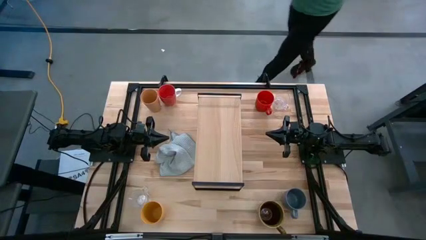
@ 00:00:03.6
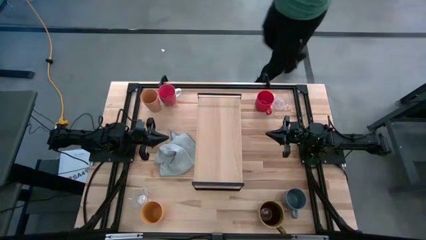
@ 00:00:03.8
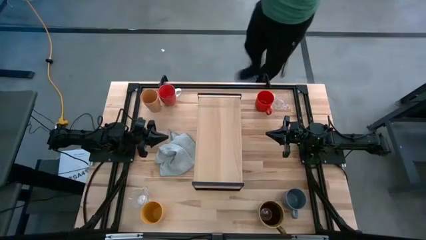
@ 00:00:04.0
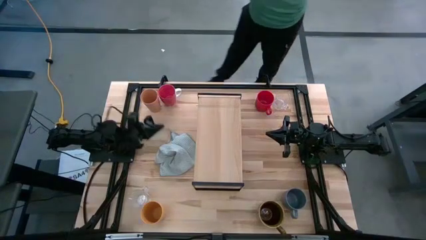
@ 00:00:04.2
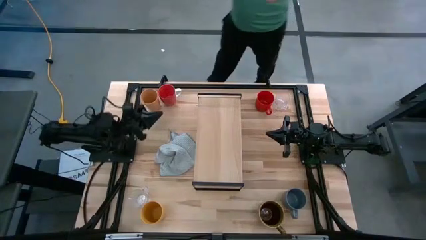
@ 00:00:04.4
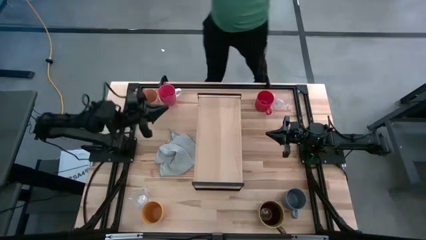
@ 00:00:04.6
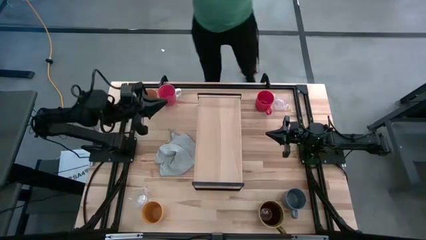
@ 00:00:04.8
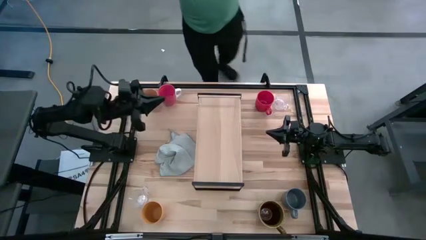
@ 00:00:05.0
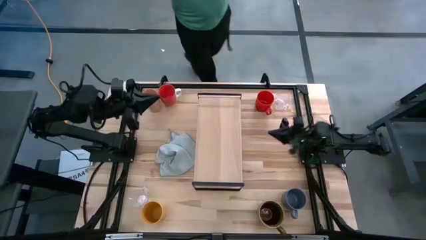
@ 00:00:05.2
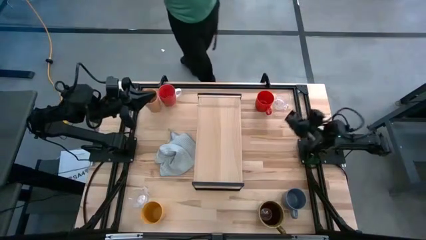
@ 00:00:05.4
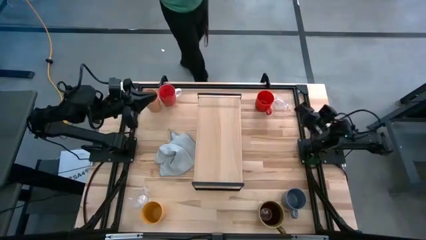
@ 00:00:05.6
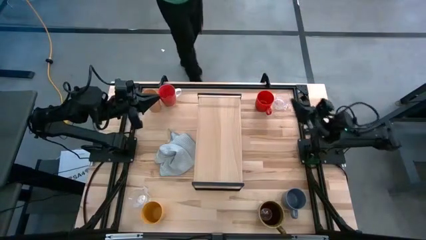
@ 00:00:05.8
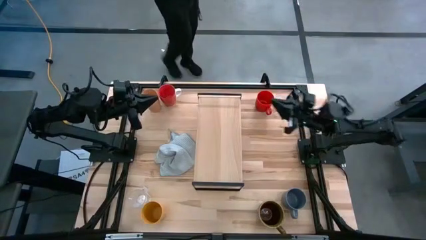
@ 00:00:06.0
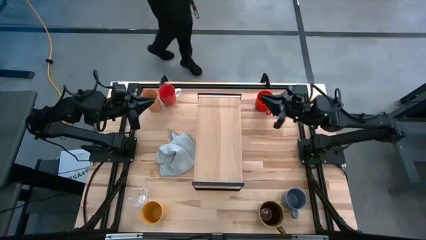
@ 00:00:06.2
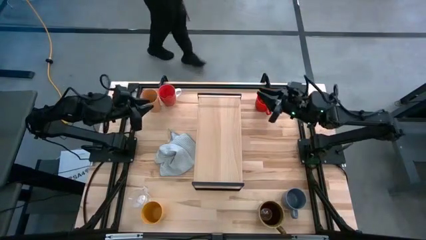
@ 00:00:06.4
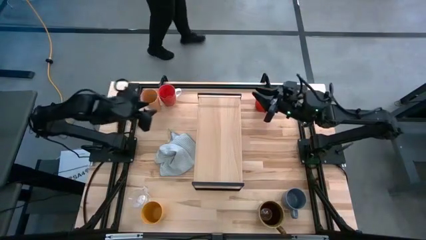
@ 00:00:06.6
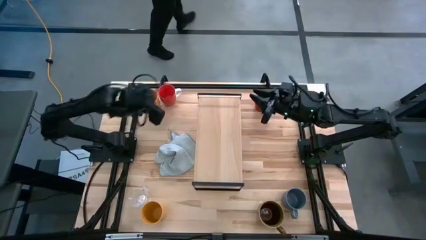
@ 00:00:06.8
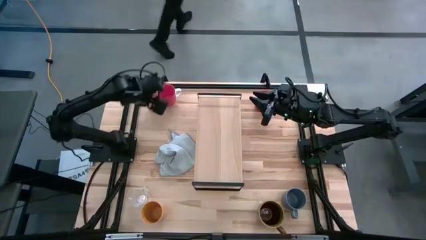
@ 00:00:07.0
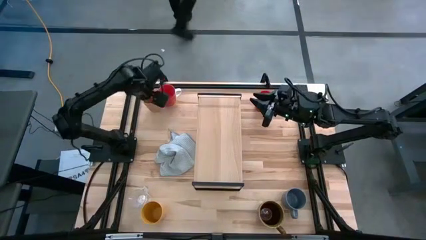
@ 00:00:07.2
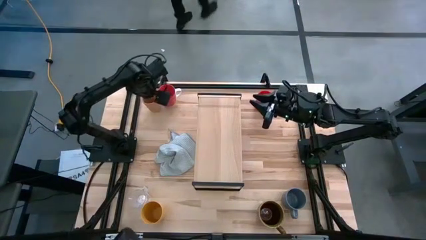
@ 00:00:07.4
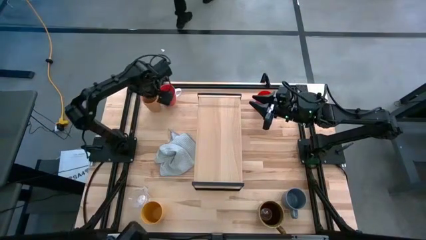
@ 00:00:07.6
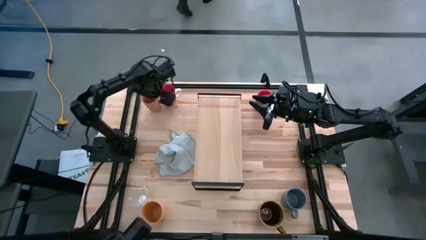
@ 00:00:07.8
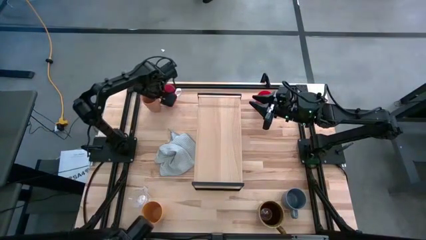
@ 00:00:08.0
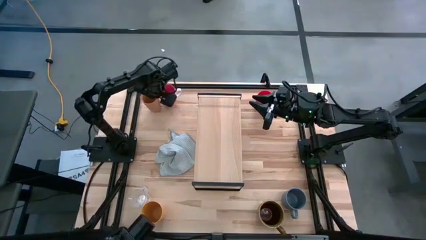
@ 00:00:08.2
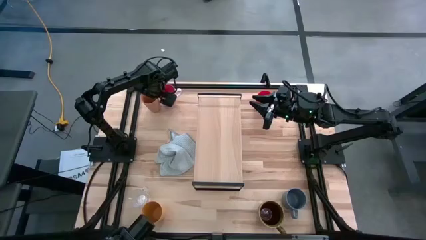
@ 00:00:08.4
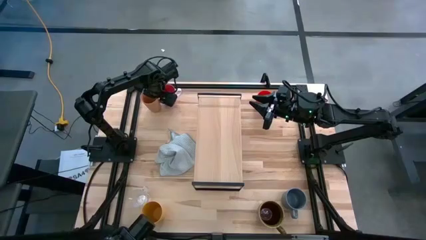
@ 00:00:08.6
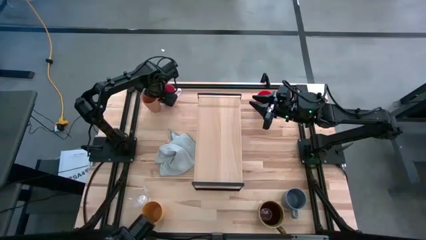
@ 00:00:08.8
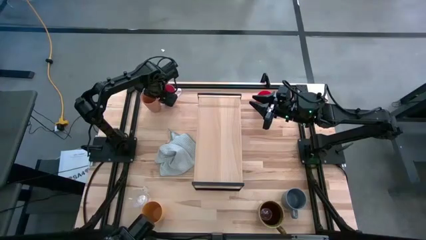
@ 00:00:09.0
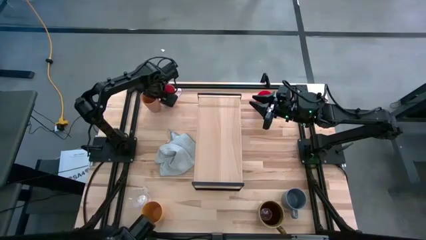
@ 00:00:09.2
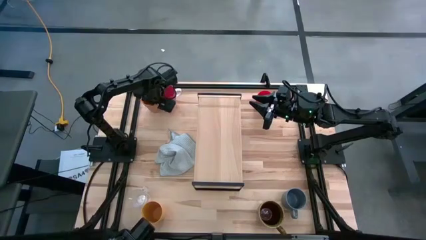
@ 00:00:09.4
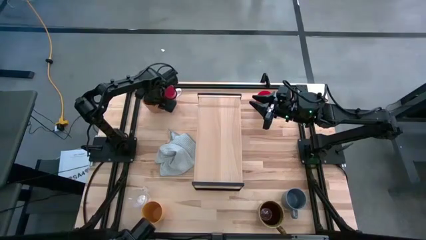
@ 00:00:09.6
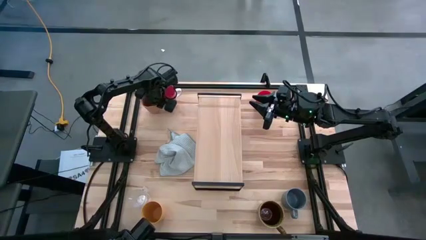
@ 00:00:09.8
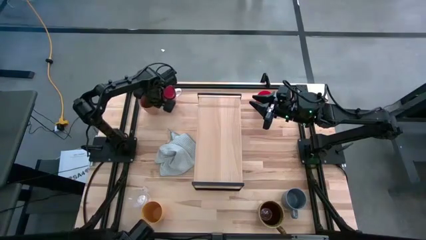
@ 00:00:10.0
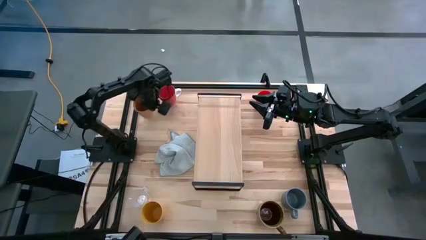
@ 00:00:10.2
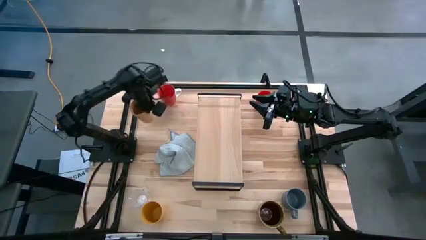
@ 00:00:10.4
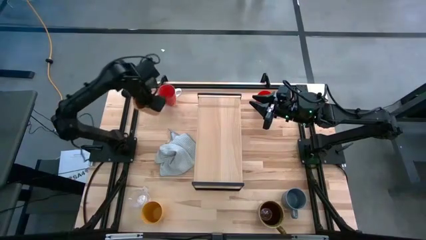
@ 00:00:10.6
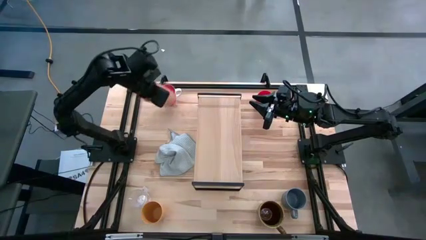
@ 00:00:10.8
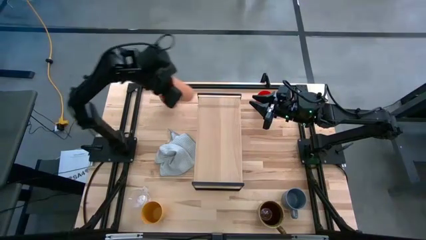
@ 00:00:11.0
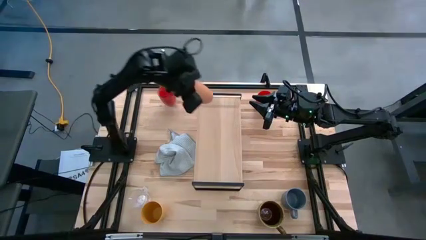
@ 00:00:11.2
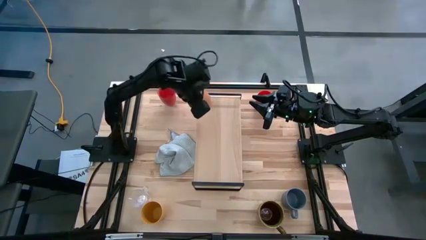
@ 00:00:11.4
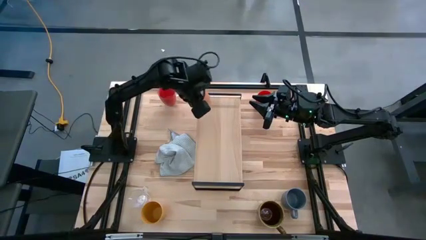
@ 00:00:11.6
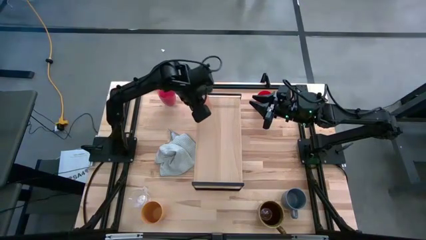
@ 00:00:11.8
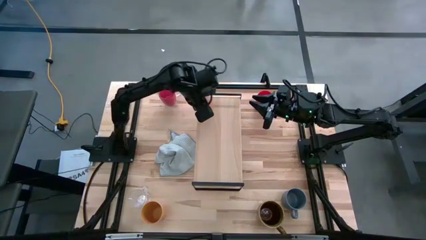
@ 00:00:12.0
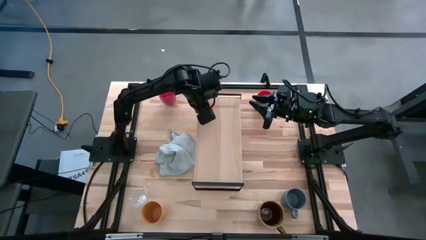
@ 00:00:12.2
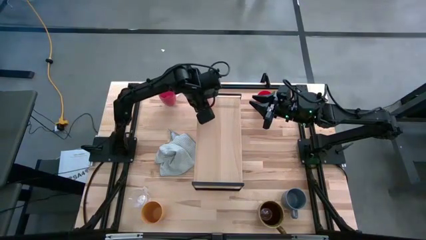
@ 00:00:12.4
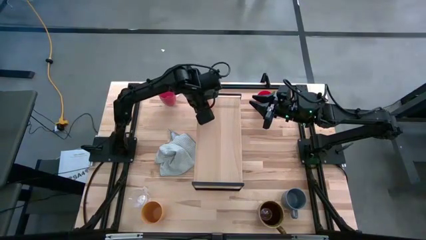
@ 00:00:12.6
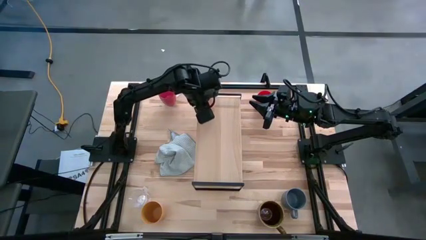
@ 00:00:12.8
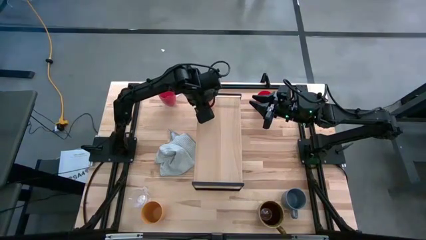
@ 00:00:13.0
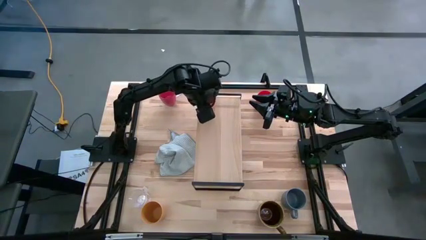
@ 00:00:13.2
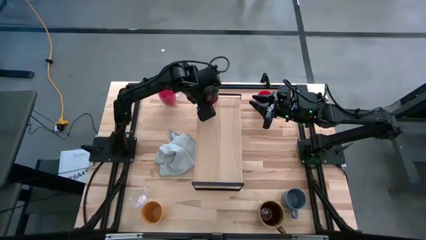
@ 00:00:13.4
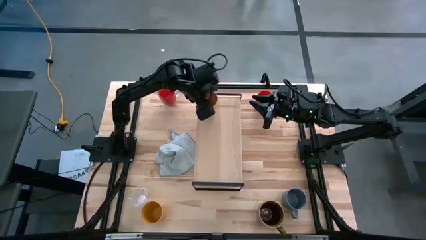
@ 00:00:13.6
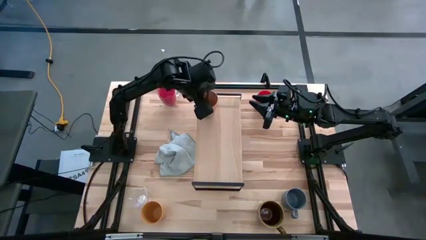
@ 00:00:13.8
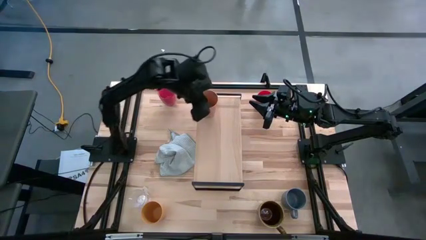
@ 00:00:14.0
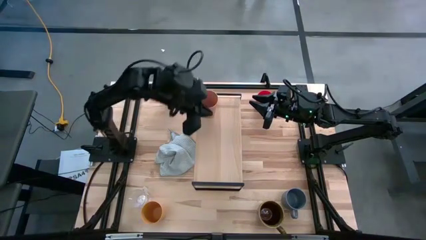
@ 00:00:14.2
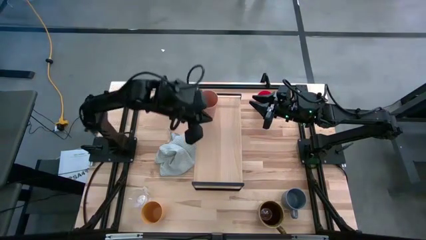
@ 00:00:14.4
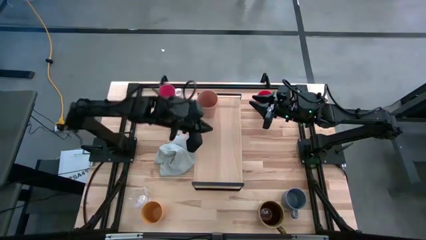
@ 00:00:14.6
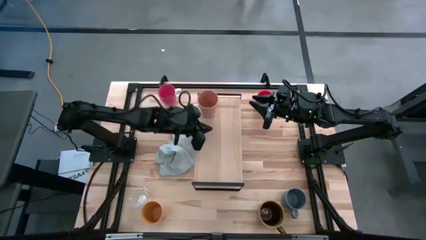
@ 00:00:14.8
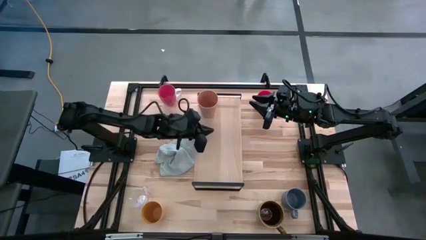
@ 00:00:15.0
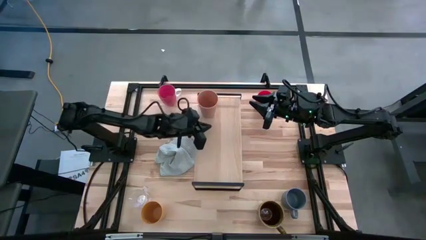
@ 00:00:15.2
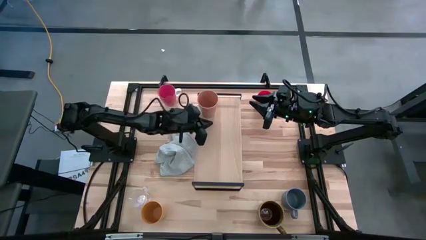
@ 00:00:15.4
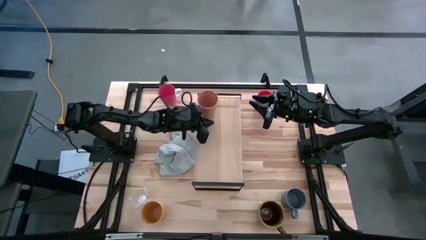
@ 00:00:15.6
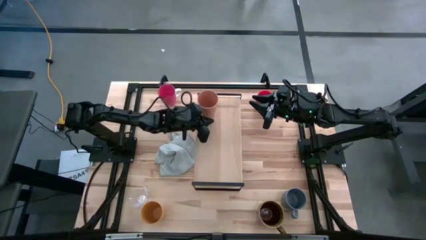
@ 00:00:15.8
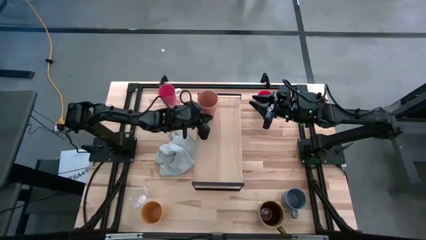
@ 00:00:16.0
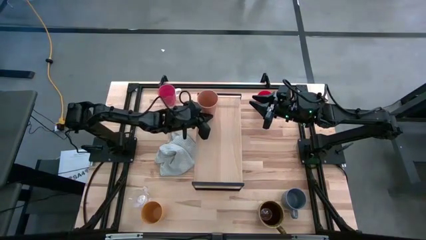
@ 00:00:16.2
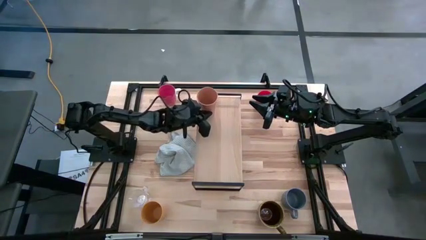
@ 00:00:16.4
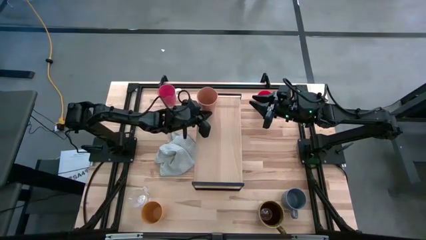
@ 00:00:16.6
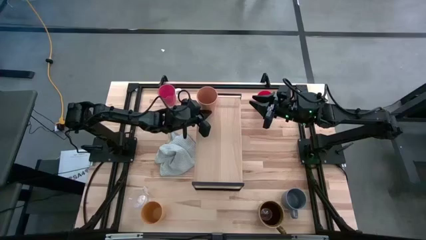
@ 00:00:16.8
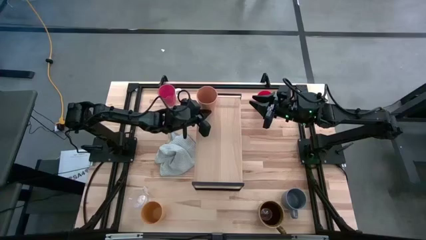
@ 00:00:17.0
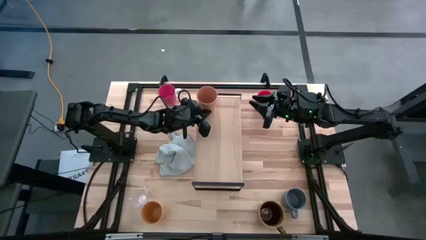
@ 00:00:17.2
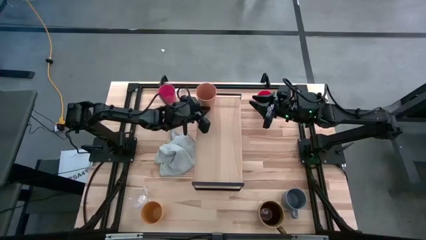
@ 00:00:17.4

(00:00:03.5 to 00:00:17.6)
Task: Stack small to large cups/mugs on shelf
Put the orange cup on the shelf
